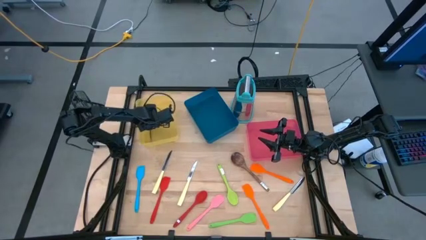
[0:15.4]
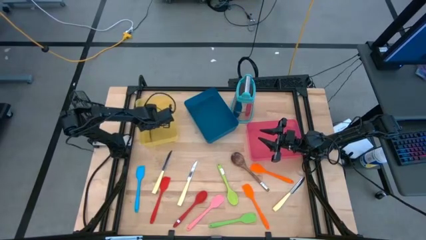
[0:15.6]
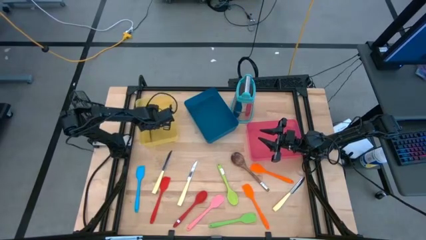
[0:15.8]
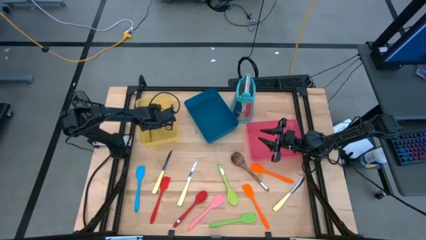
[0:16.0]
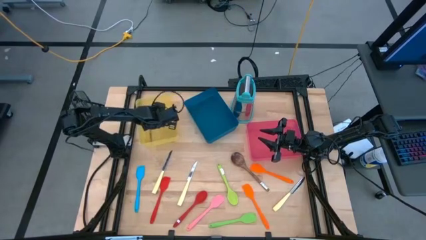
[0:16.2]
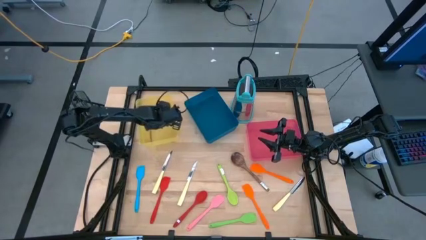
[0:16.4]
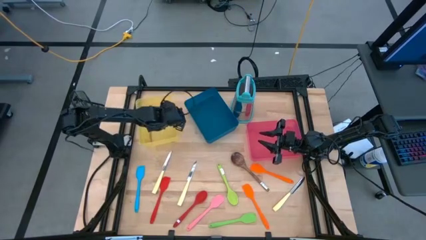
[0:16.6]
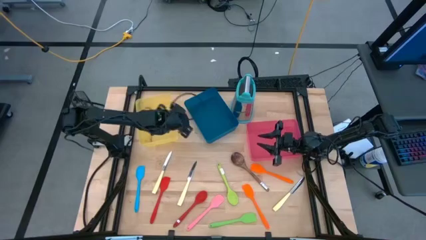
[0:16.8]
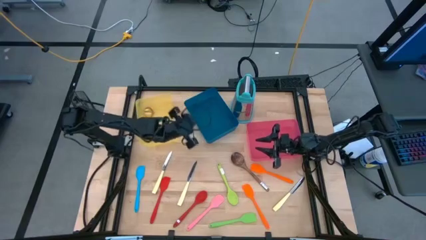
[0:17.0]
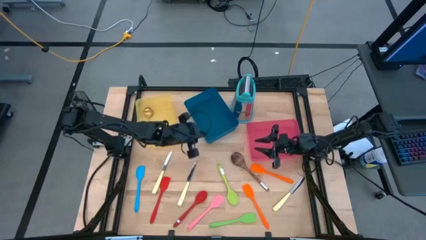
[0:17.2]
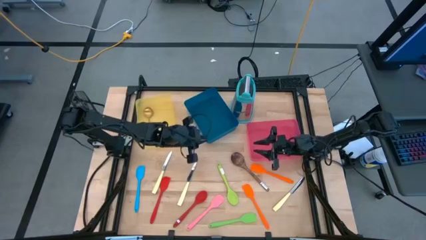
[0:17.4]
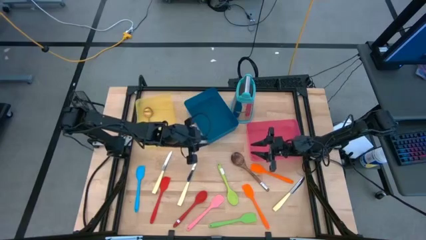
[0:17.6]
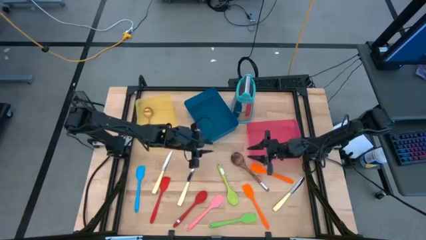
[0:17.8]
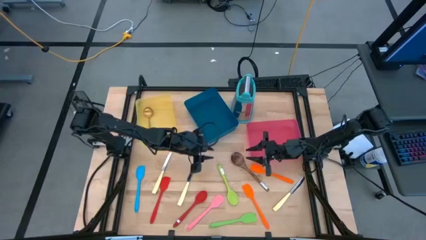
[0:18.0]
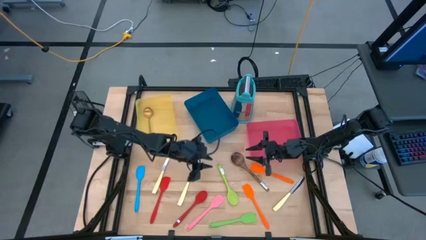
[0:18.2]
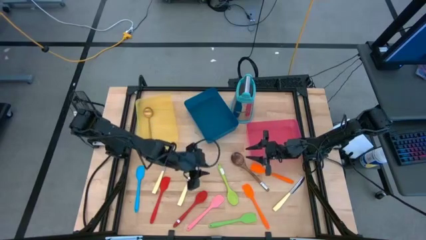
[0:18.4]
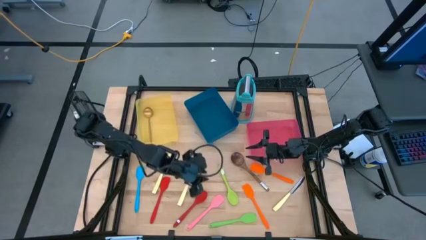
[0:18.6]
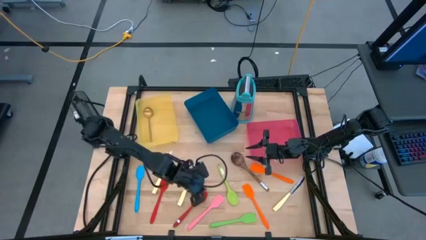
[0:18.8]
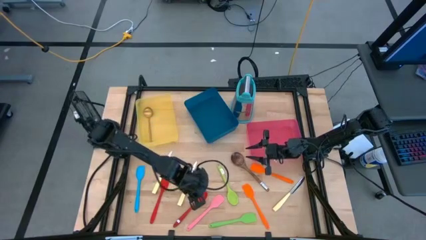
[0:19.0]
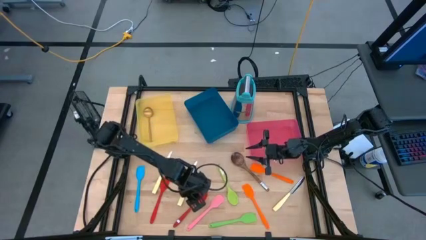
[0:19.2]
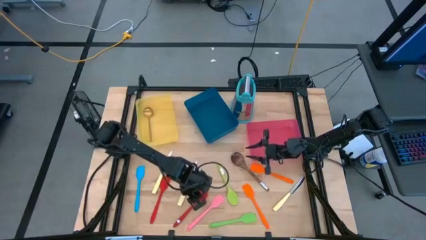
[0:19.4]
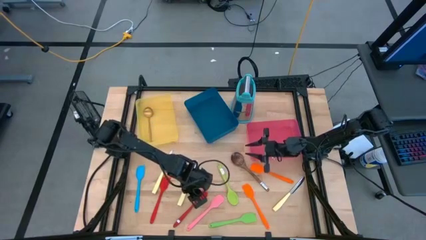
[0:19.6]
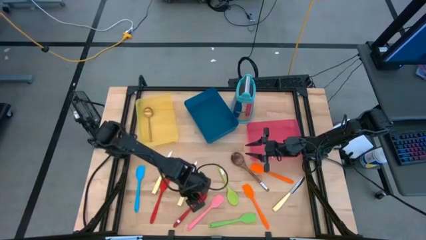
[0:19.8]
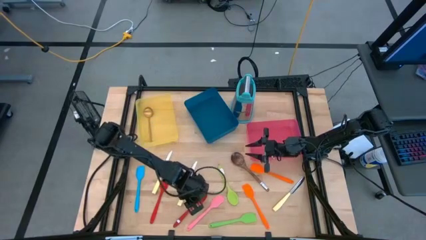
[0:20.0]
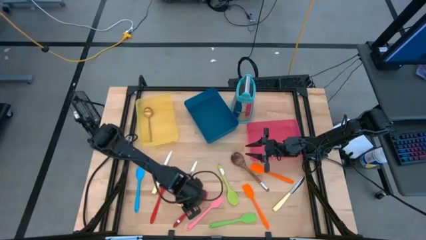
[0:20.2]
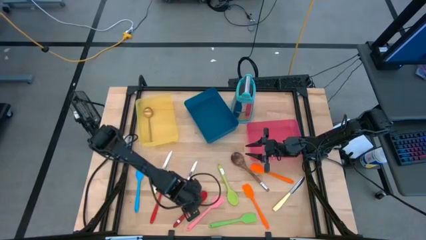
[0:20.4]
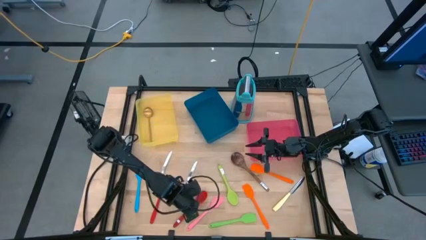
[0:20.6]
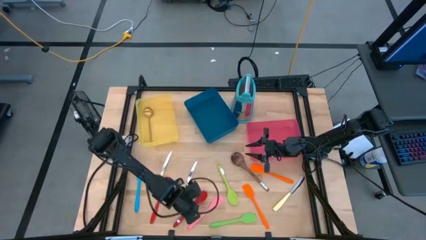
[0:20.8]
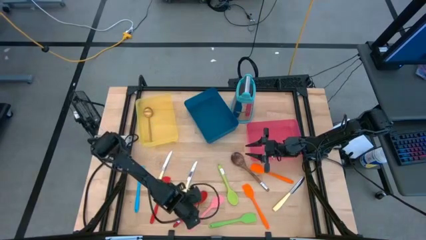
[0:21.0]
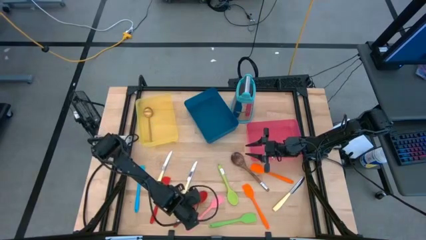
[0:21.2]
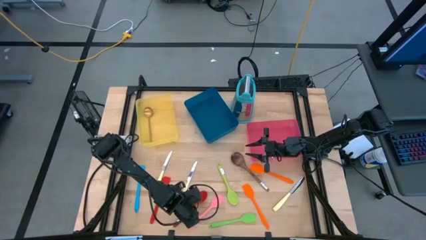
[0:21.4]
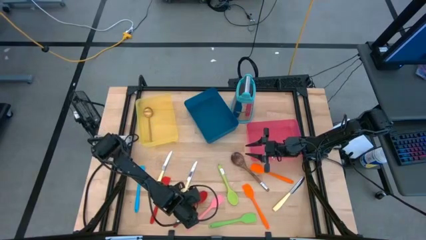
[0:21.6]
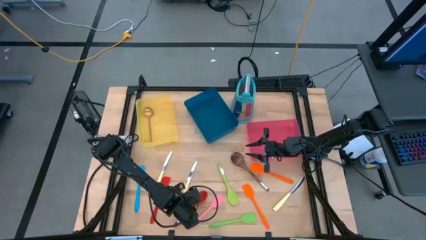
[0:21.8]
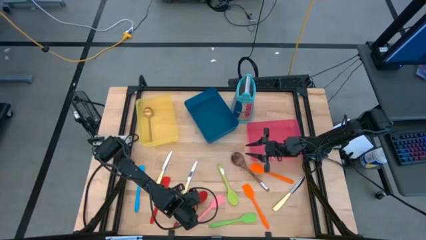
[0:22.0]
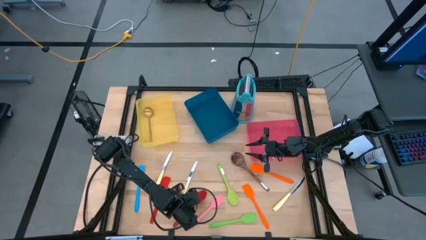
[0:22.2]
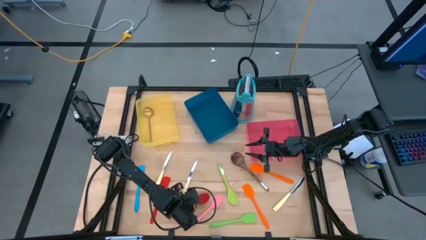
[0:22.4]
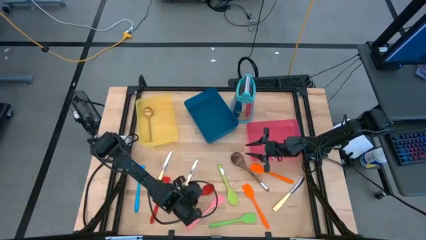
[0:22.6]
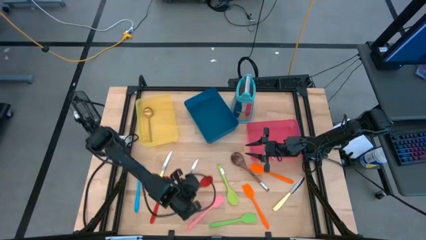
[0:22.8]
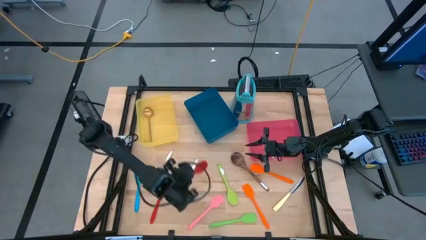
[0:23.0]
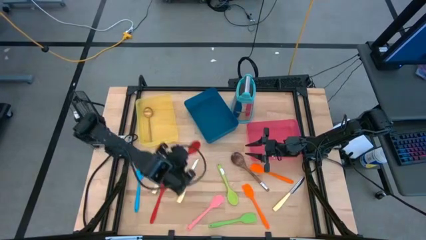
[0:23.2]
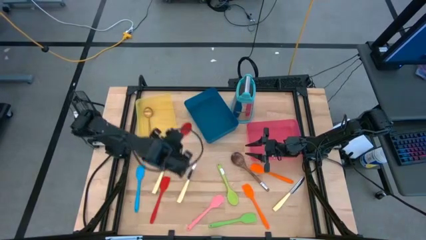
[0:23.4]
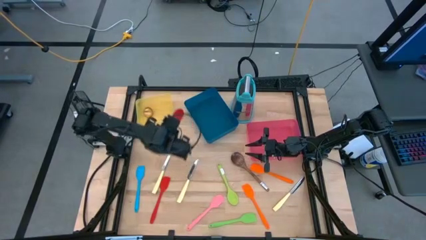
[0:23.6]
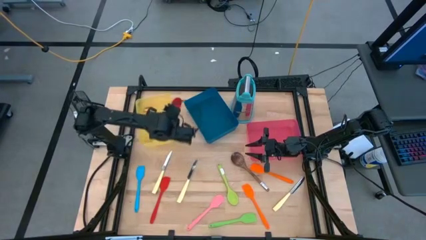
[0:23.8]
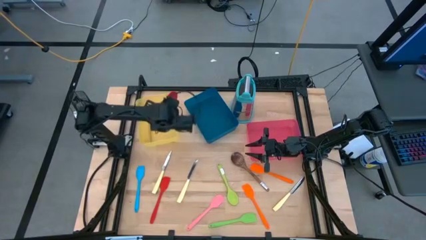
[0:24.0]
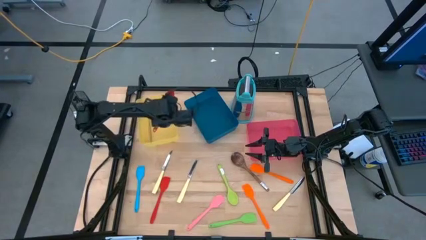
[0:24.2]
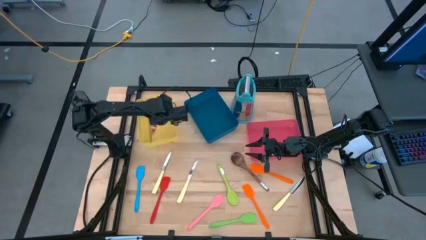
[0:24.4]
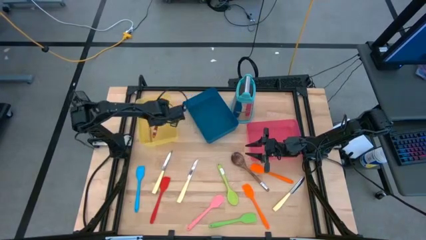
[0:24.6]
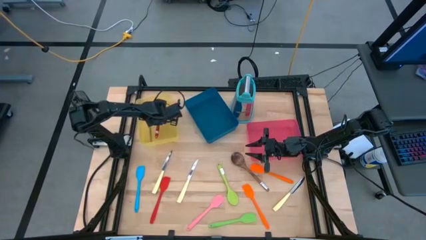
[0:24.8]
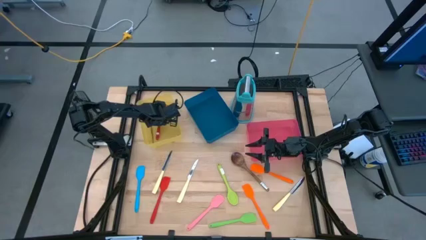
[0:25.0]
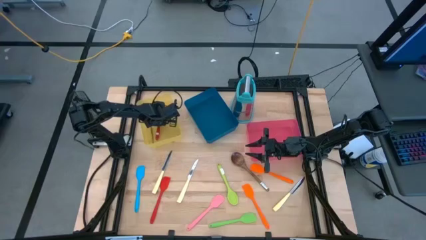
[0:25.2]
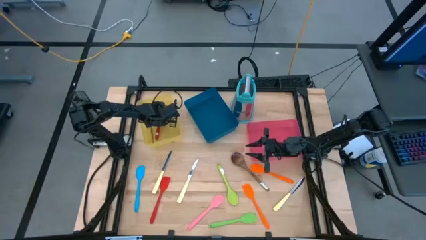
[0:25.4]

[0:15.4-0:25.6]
Task: Pick & Place Kitchen Items
Put the red serving spoon into the yellow bin

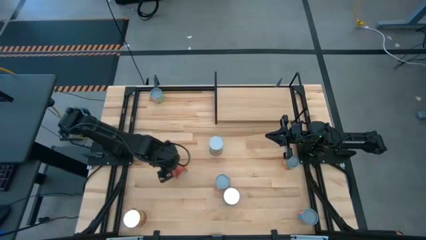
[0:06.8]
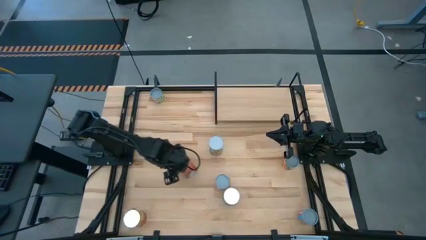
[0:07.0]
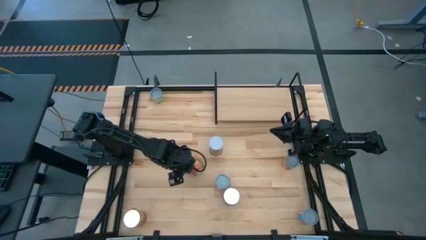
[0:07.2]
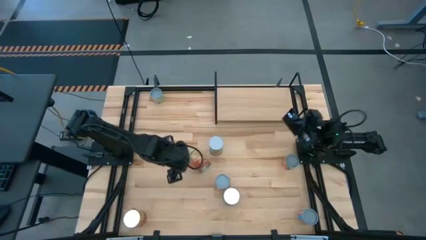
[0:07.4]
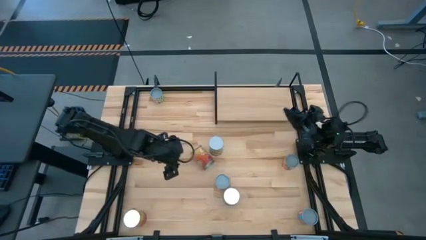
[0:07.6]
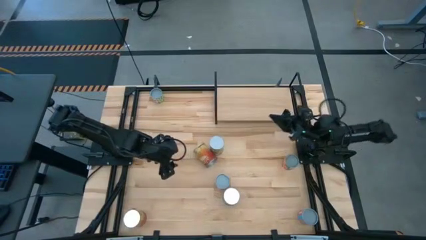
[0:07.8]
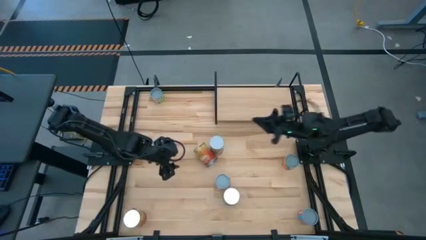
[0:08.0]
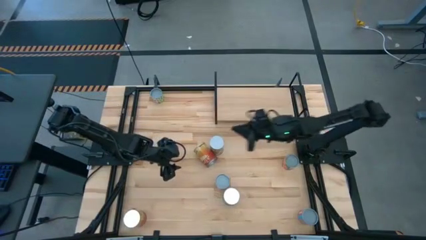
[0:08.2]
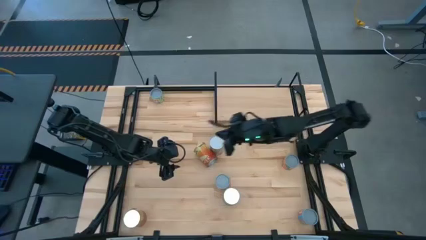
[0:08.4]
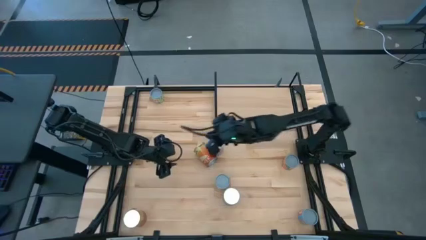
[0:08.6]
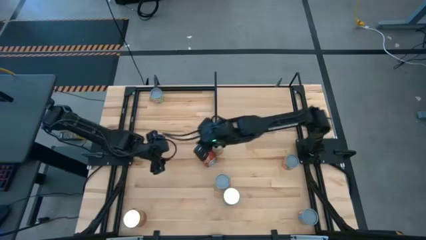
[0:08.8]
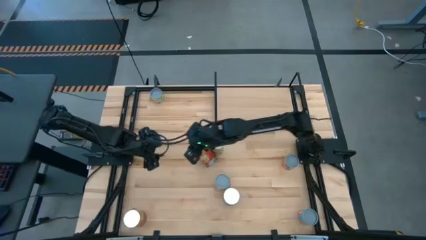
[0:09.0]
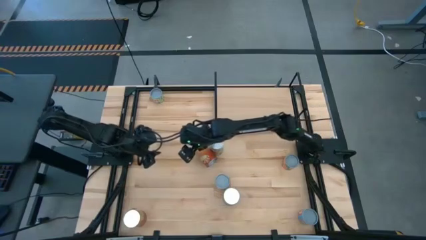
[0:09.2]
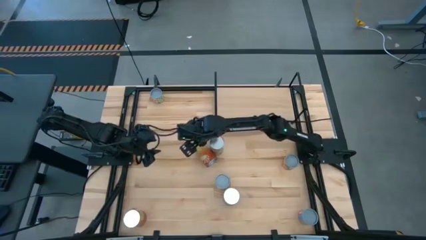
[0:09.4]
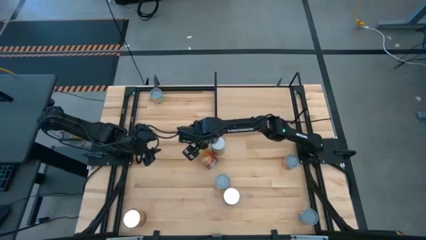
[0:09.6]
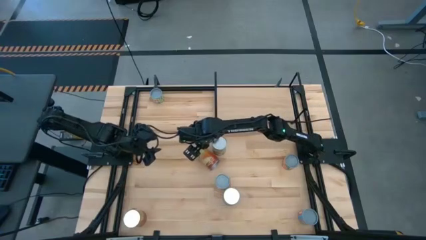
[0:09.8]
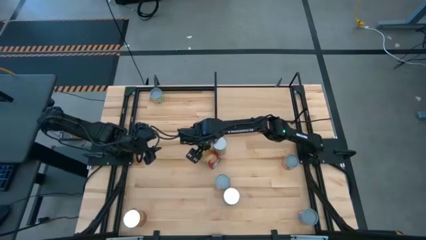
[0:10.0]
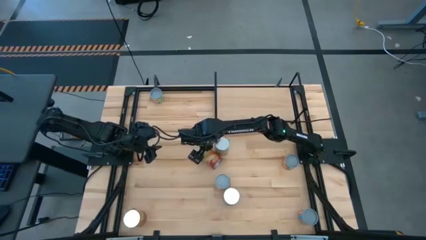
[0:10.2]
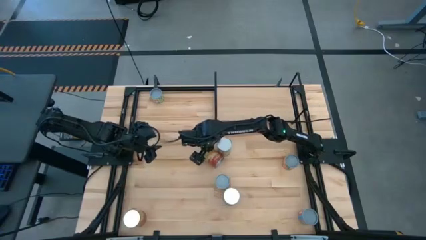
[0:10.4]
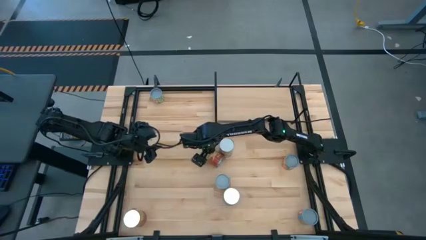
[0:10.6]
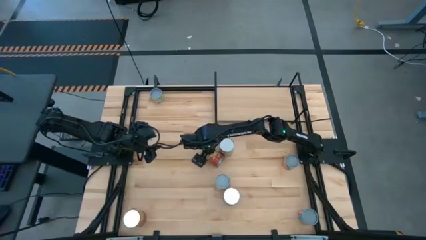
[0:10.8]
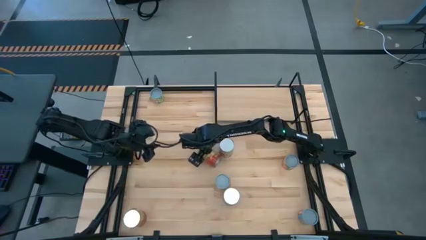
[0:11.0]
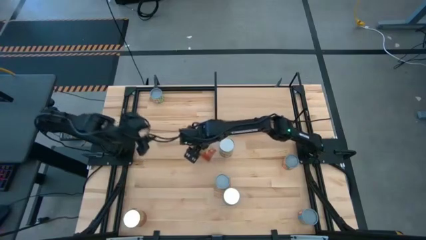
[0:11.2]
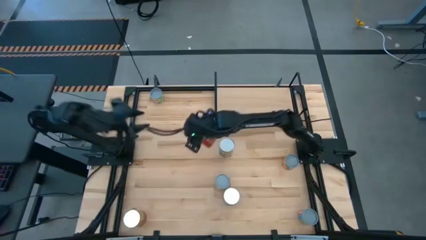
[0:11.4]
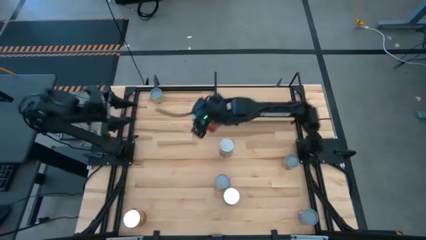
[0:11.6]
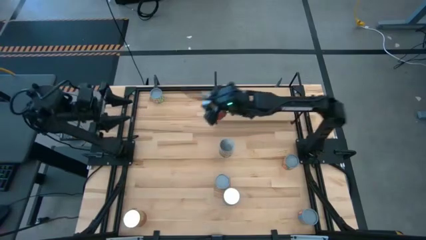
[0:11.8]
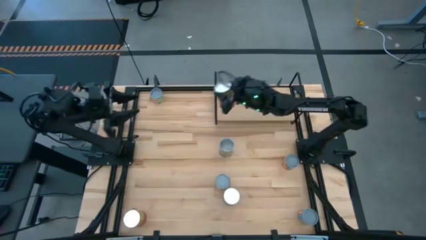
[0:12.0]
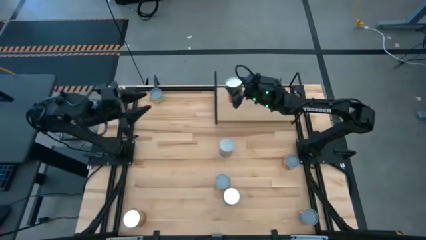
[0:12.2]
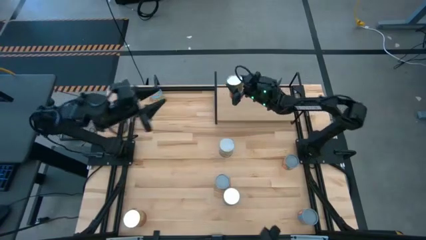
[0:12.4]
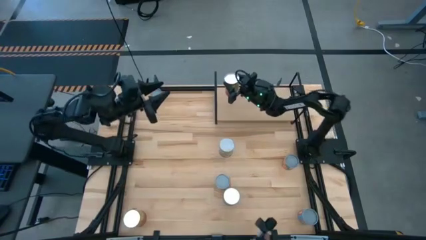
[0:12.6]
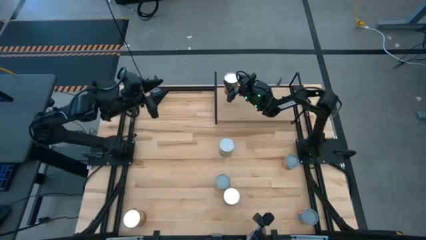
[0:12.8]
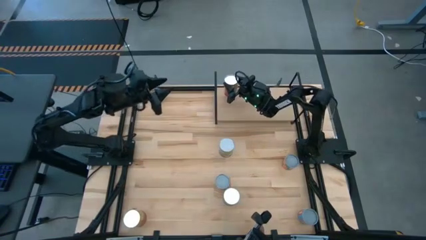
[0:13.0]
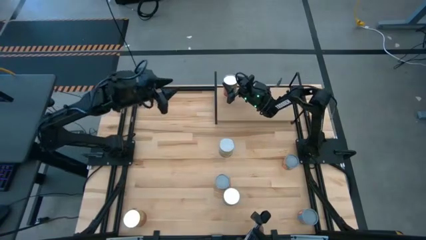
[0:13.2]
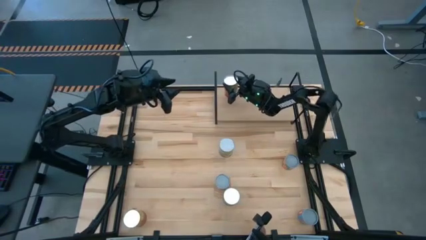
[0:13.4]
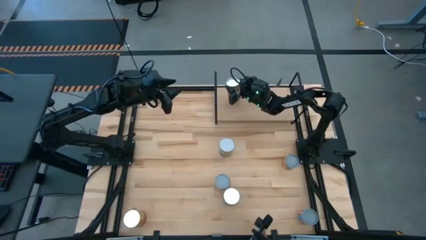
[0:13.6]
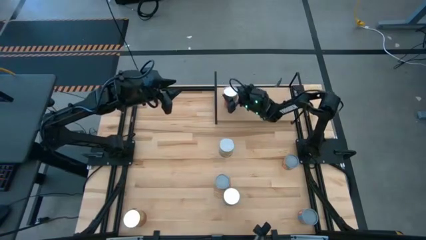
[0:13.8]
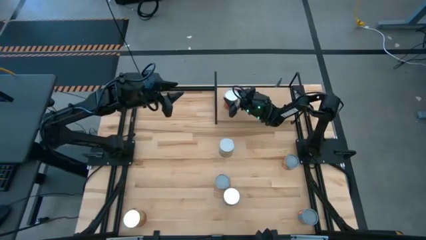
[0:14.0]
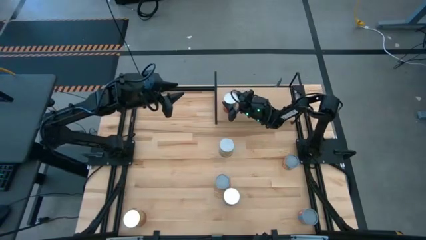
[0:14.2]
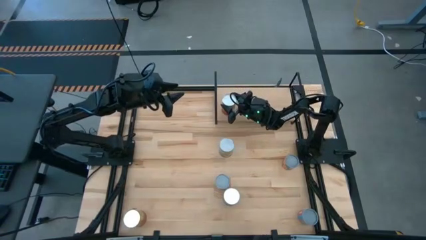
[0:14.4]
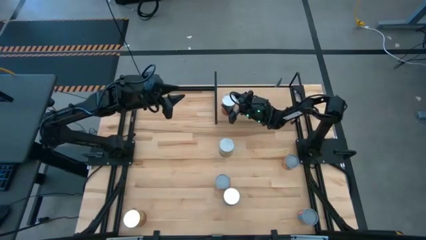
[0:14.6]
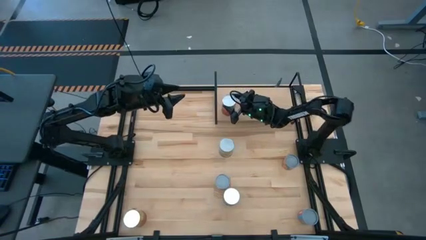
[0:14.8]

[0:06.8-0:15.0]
Task: Pick and place cans onto a shelf
Put the top large canned corn on the shelf
